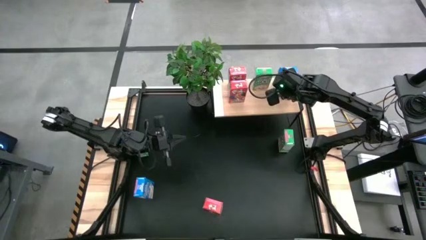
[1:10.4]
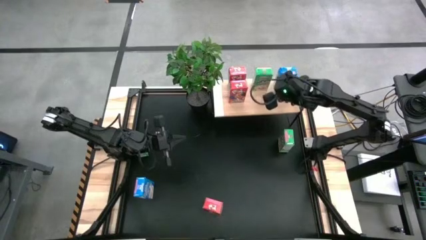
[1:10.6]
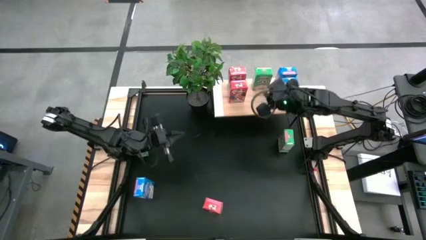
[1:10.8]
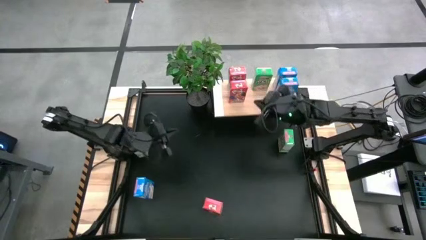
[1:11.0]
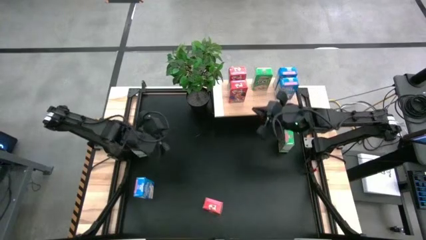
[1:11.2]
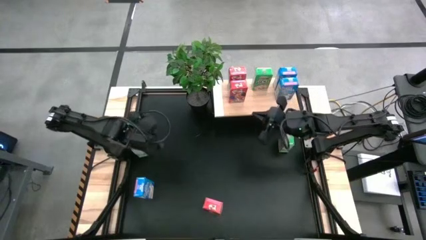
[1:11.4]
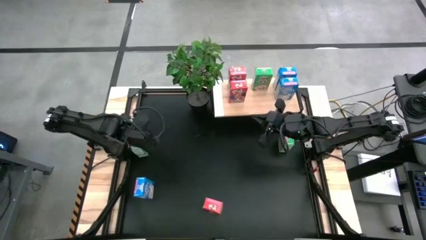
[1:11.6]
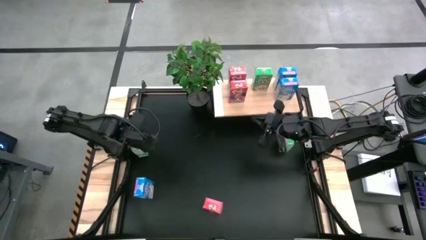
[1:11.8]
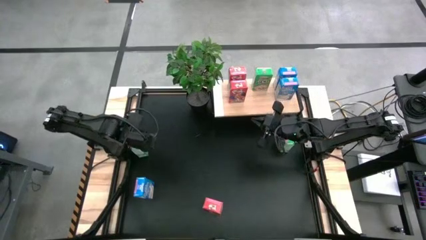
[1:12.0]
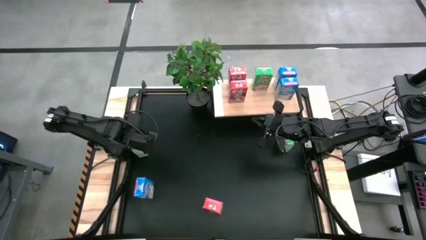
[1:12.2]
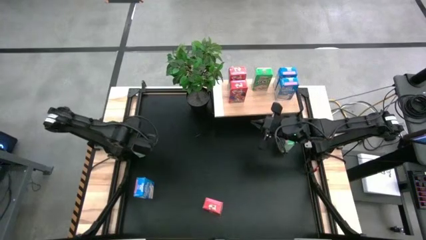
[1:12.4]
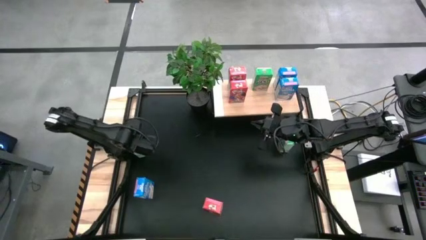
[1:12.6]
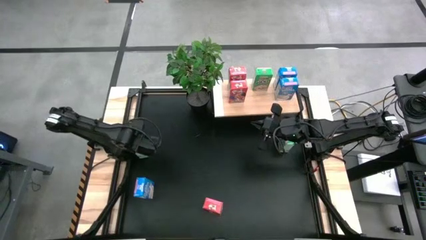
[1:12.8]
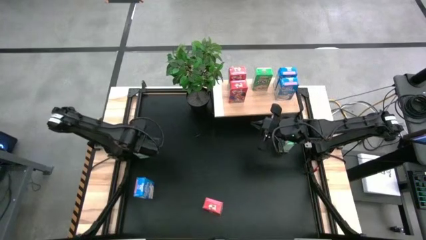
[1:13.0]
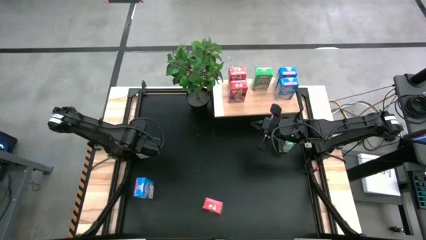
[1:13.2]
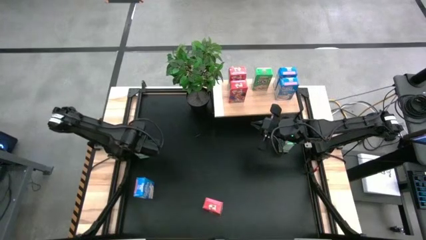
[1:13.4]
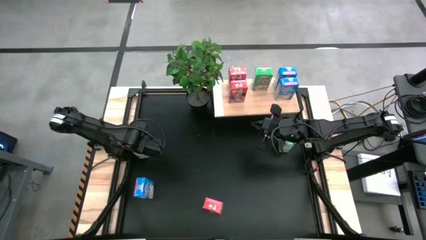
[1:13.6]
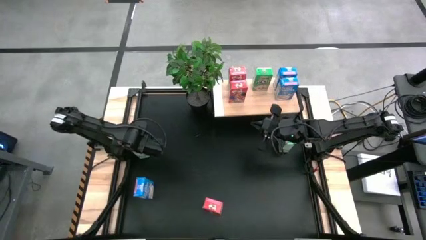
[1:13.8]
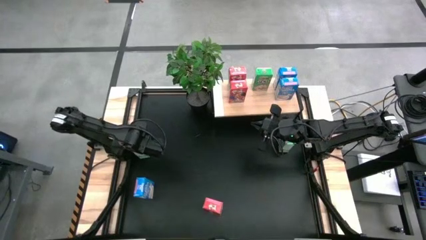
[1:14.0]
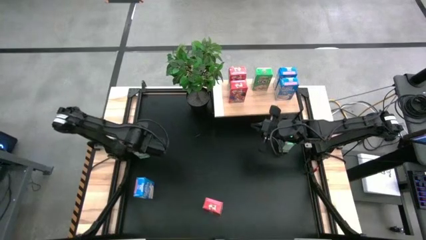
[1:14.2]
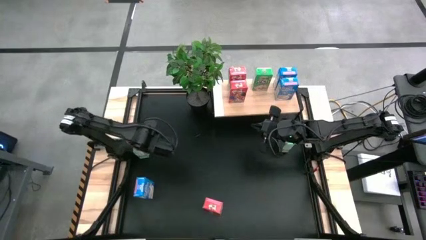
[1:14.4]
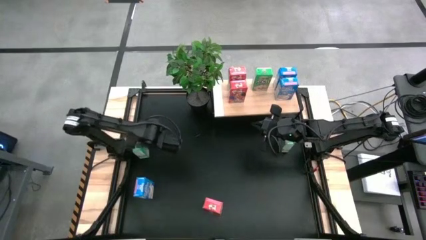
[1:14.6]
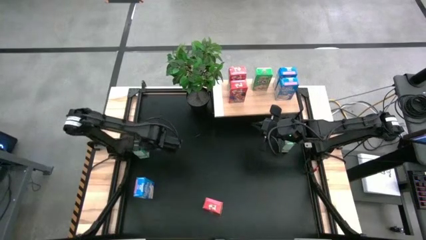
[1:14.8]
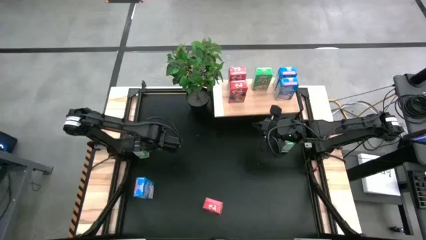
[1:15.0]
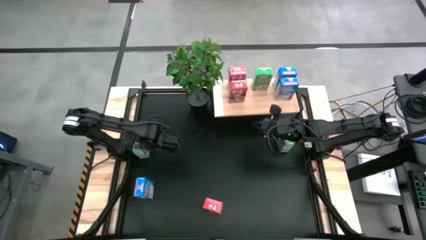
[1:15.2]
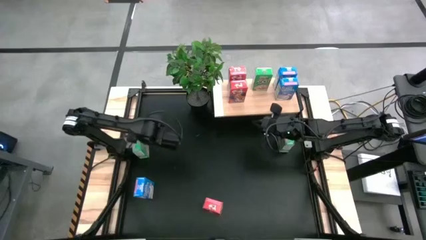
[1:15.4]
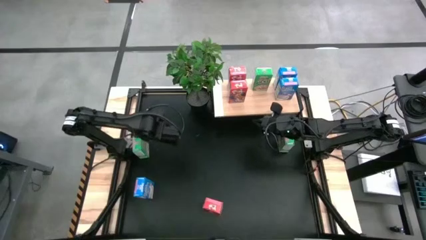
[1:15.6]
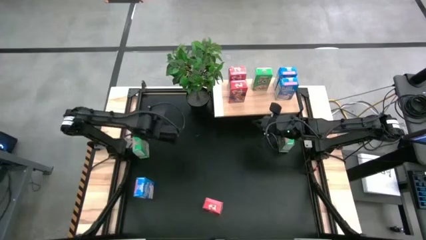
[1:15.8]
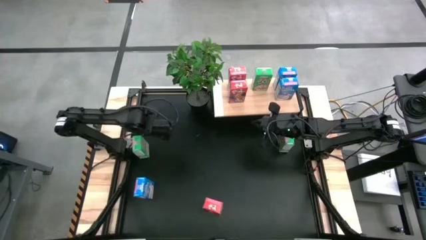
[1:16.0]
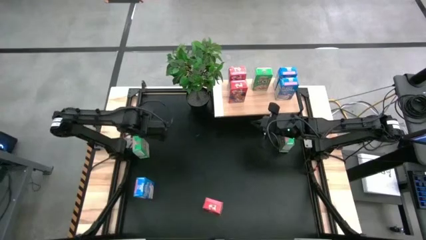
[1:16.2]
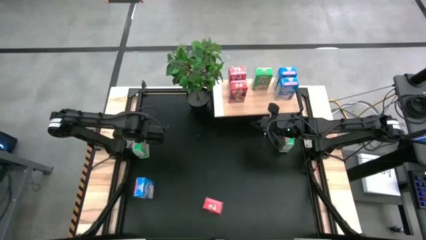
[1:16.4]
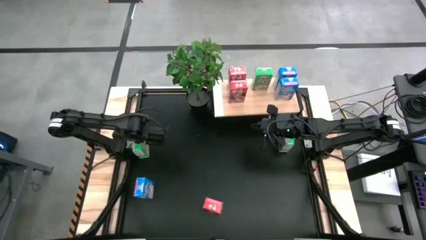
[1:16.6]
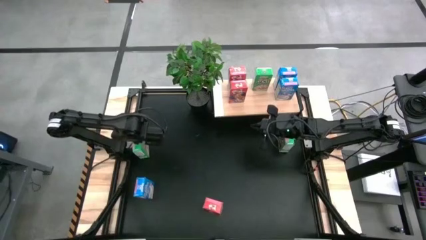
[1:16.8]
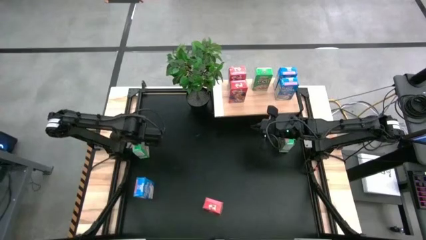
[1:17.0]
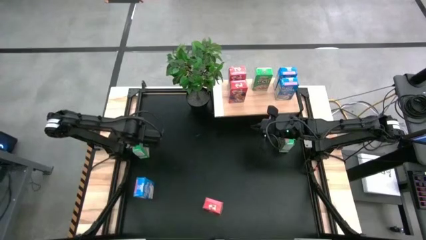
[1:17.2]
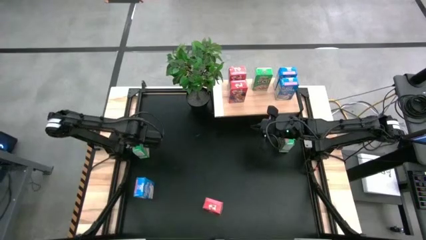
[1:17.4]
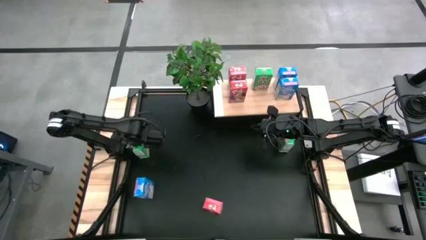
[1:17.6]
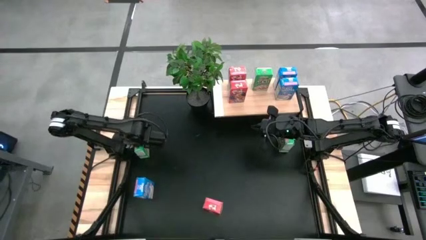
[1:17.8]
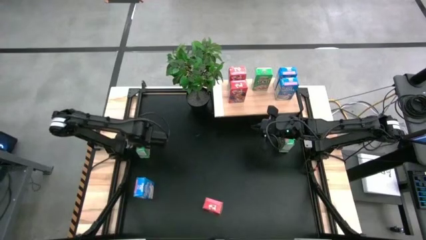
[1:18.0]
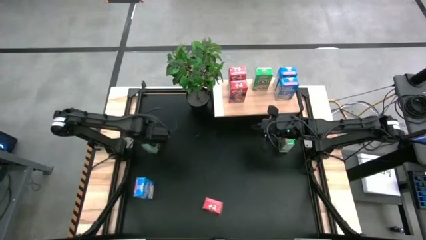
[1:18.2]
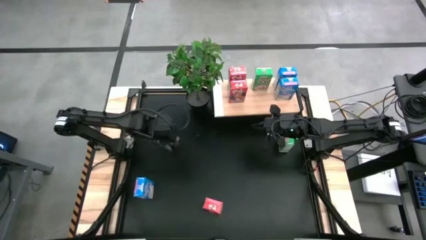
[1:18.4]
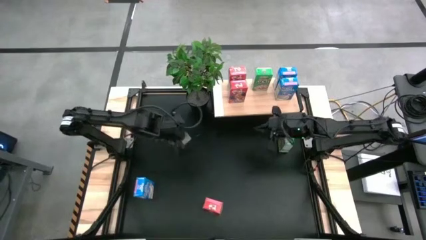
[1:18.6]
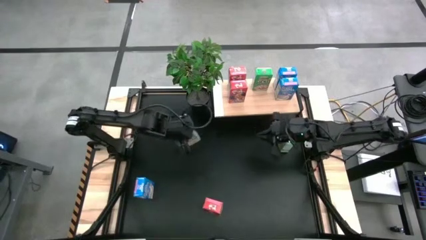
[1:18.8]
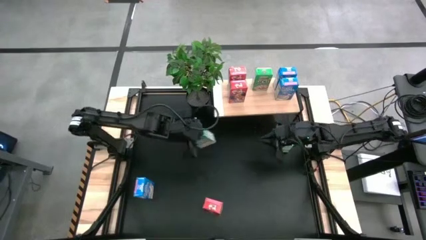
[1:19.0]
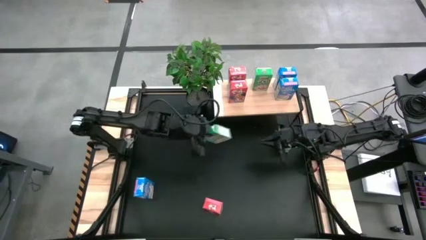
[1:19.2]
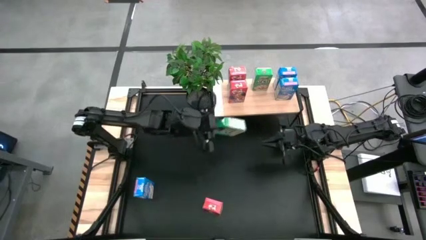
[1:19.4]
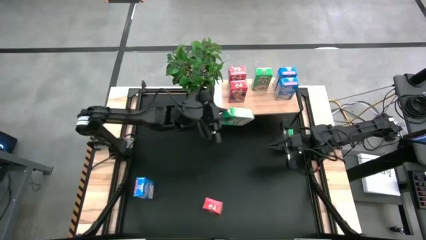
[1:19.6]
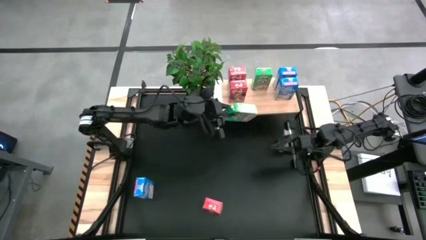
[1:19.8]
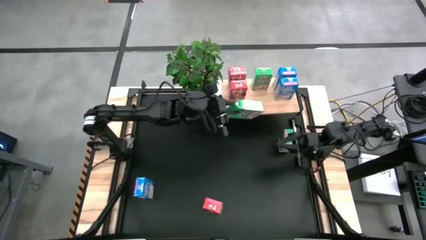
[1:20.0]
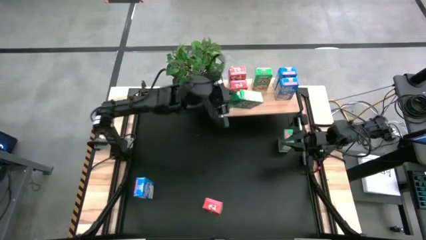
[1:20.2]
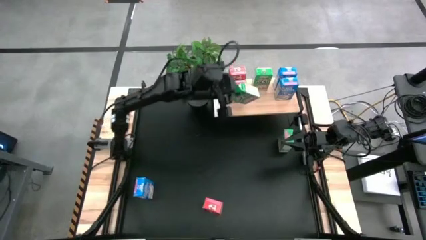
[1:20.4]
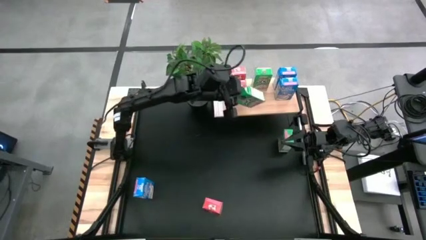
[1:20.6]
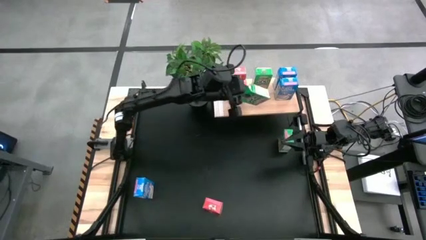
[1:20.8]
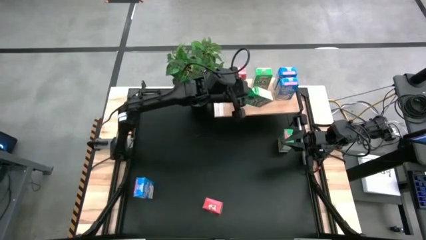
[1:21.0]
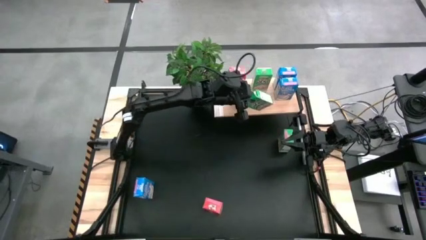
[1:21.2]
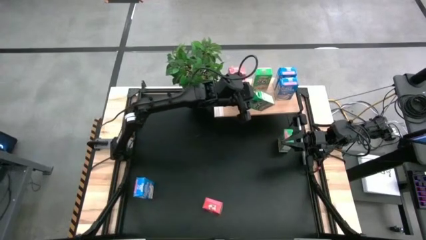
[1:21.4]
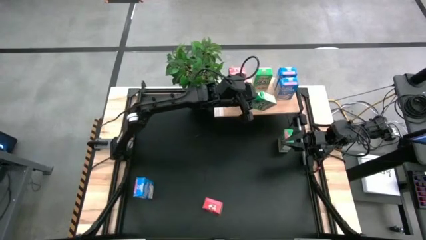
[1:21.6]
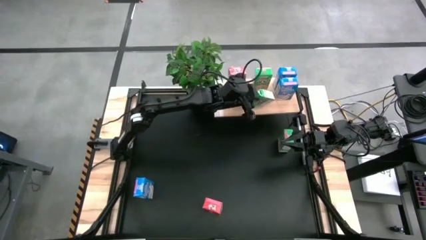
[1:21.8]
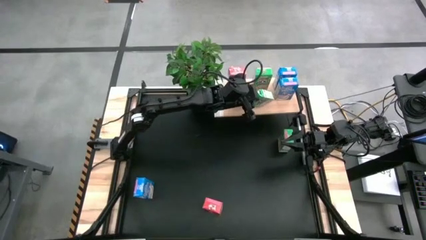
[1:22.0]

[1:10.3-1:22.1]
Task: Stack cereal on shelf
Put the left green cereal box on the shelf
